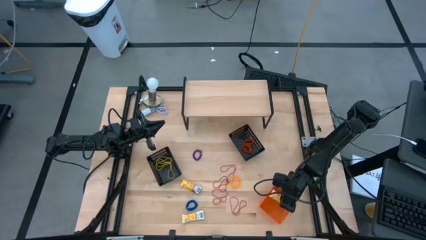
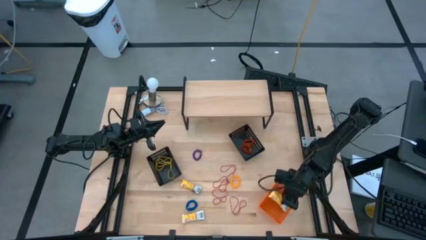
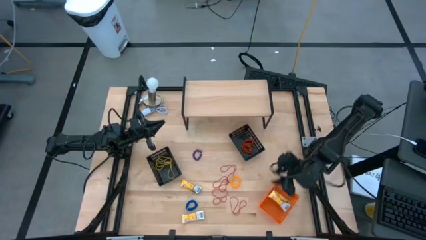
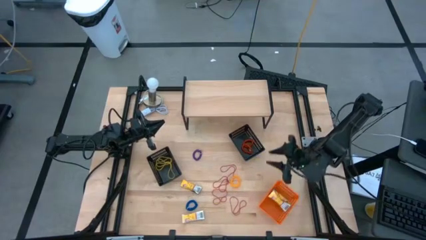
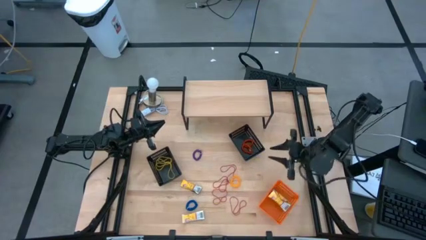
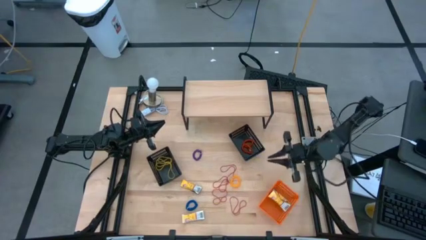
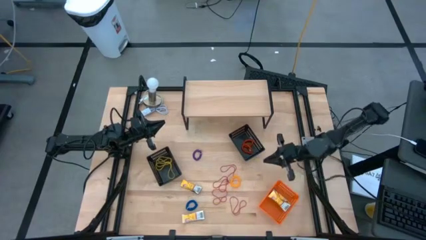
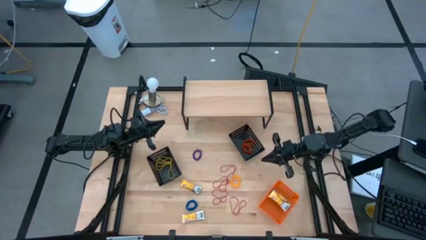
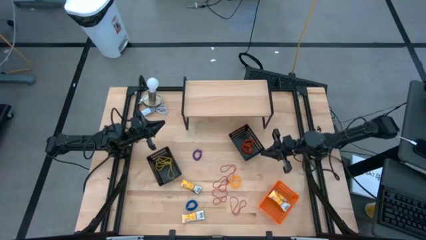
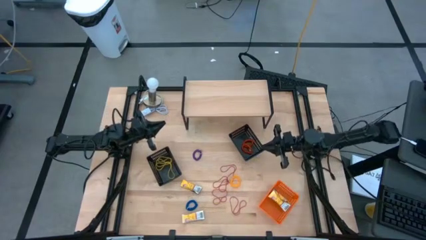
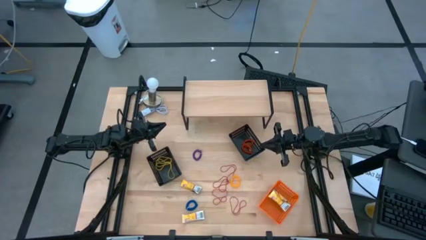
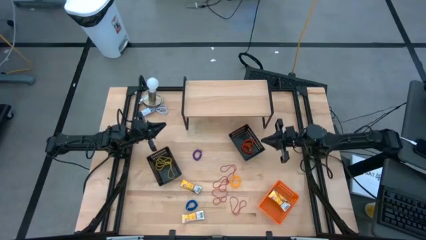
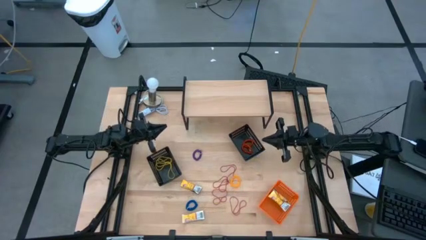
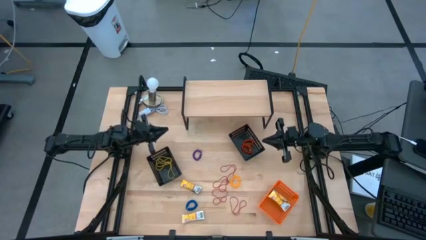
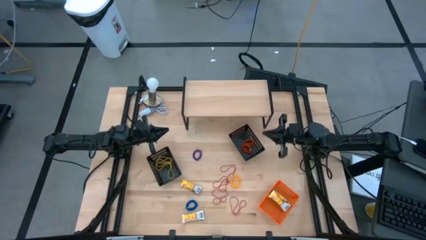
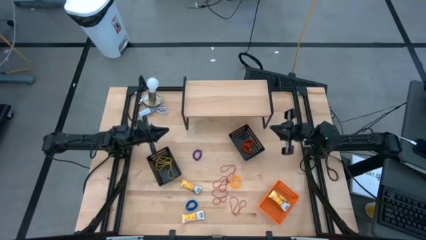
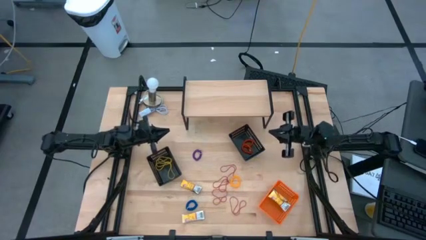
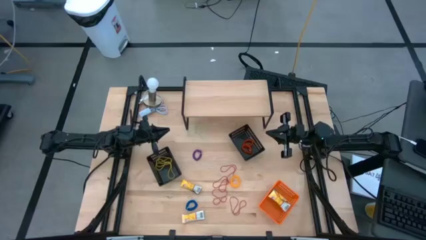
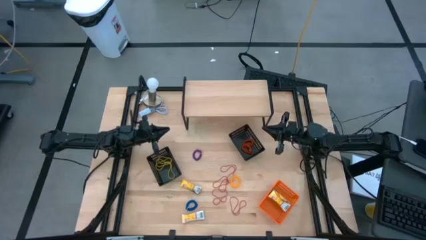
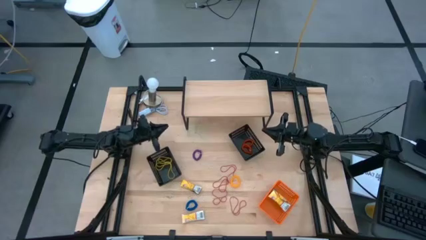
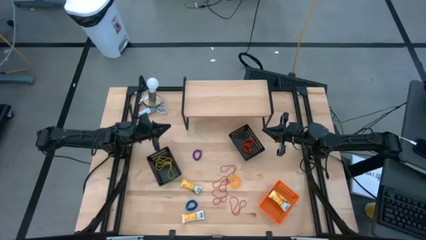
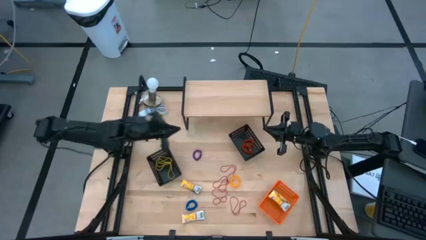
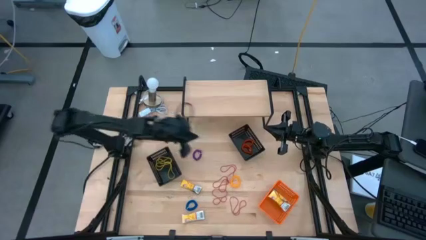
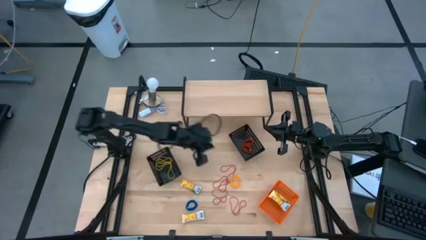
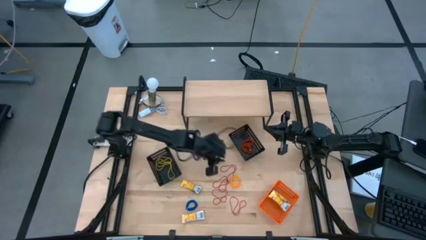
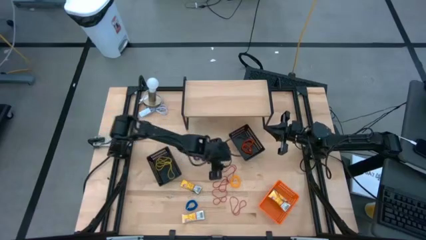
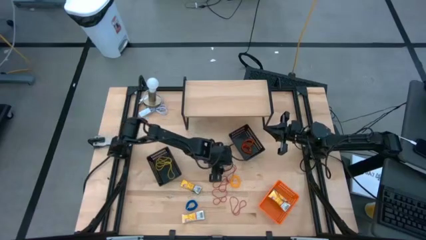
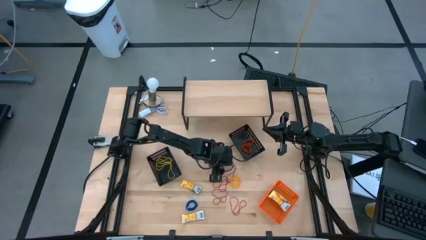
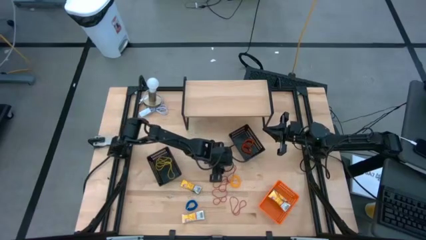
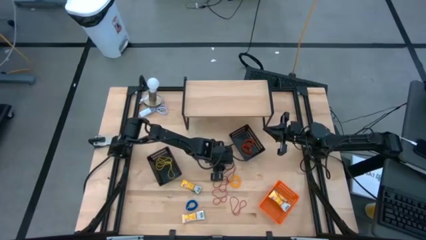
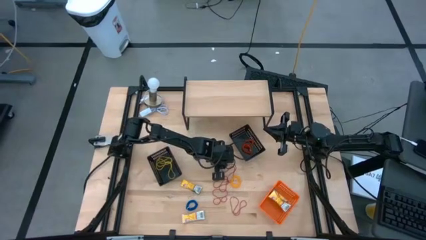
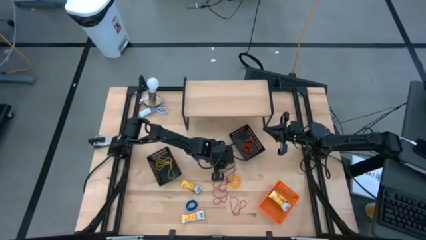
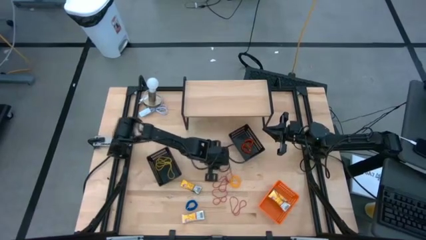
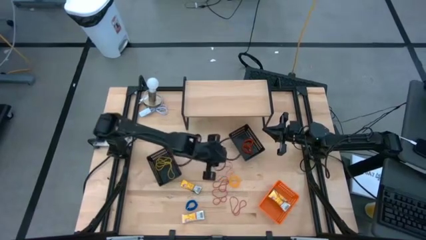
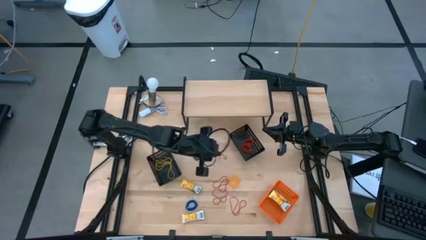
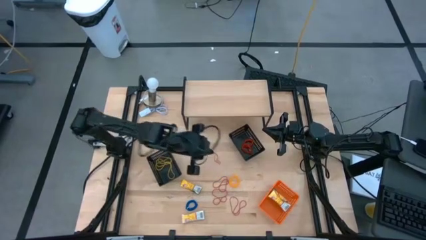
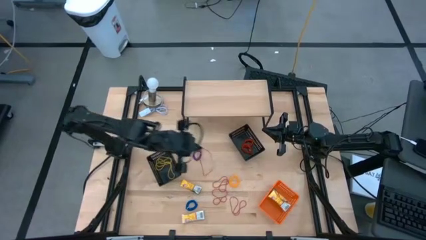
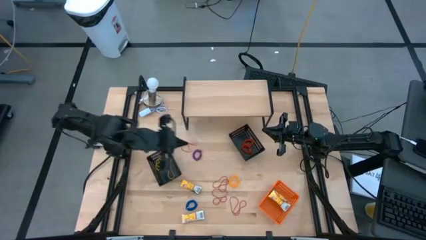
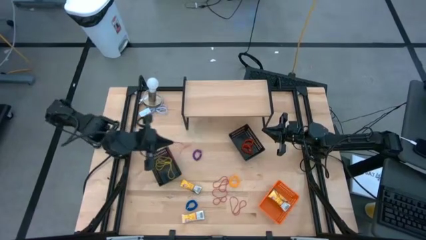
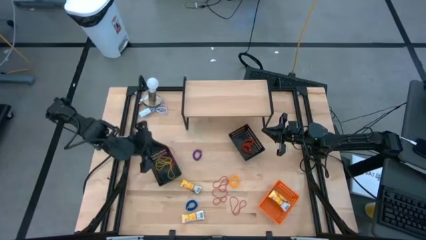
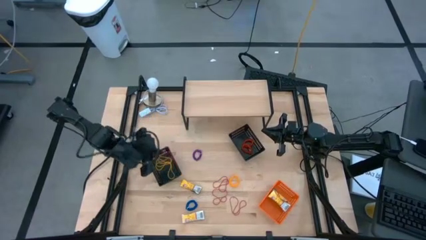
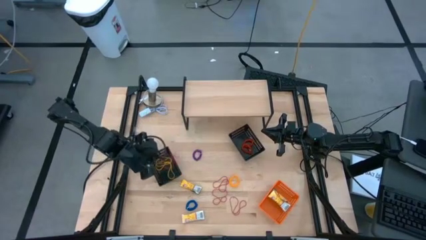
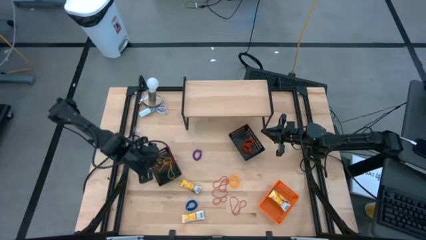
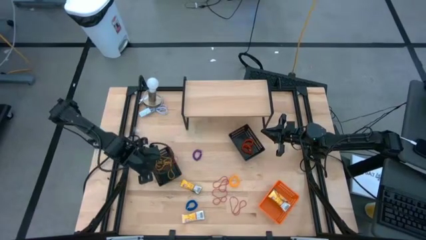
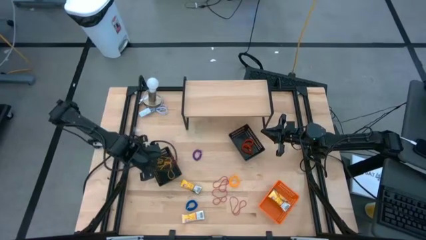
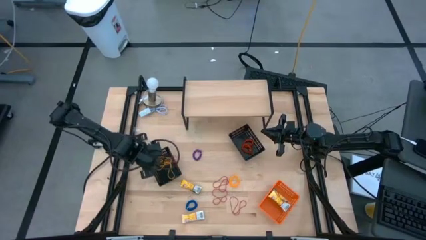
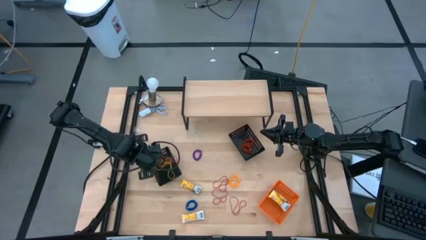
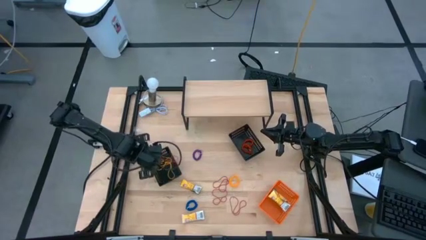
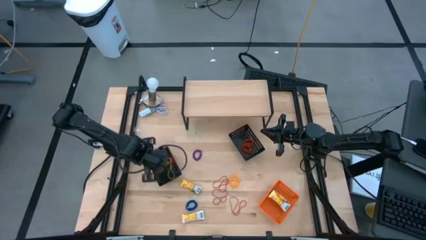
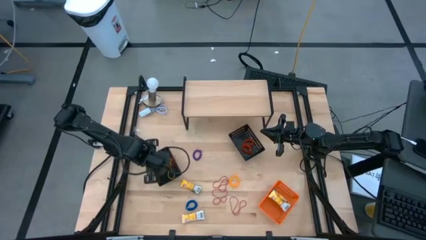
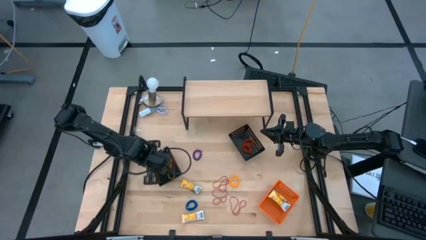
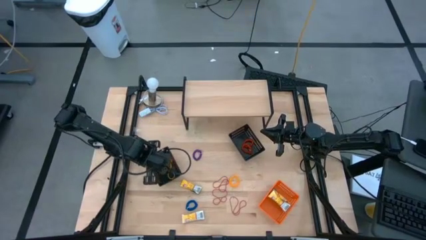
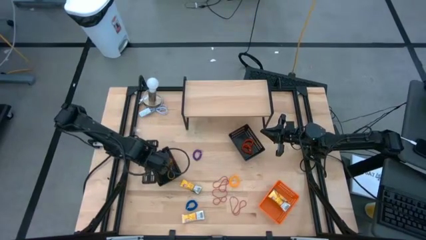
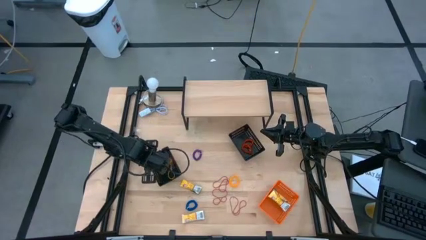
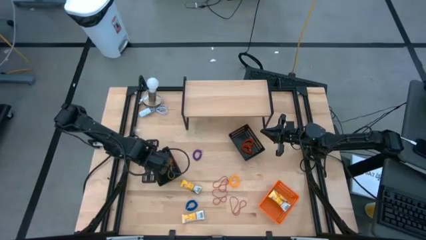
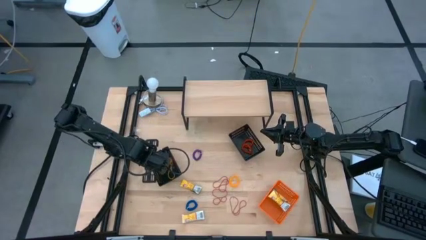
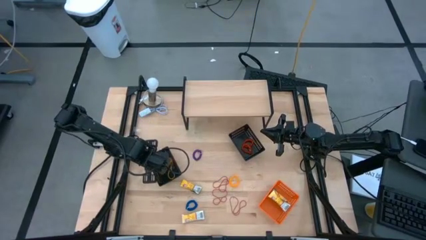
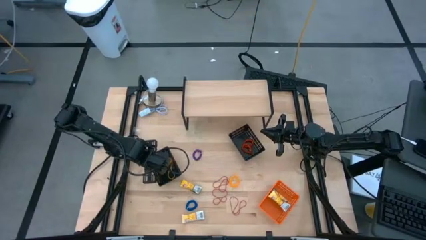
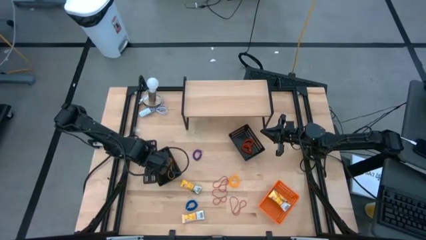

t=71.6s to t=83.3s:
Task: Pick & Place Office Desk Supplies
Put the red rubber band into the left black bin
